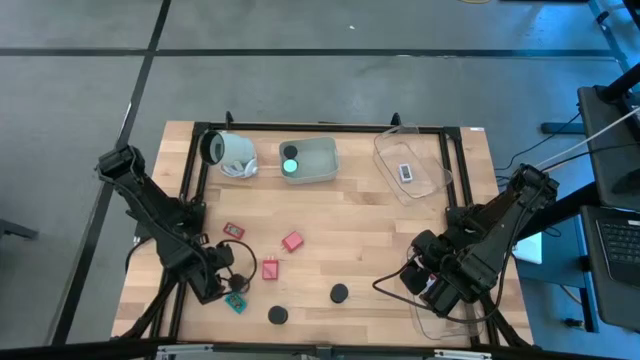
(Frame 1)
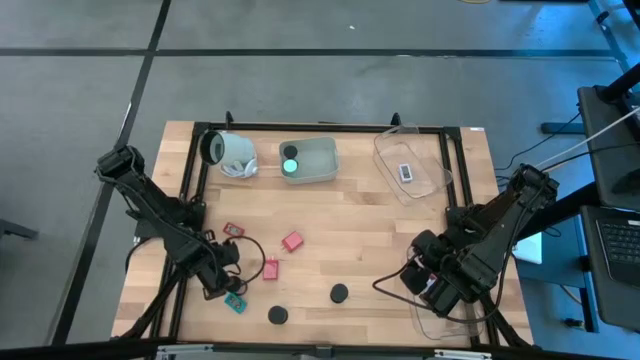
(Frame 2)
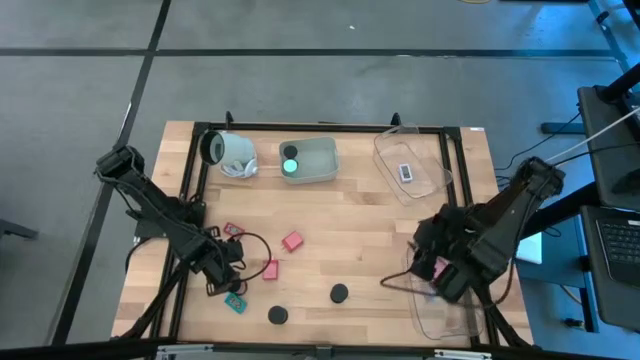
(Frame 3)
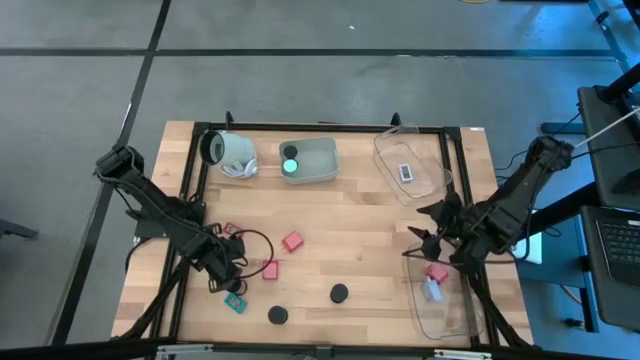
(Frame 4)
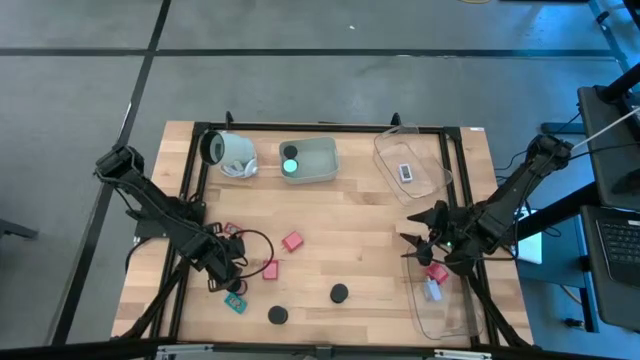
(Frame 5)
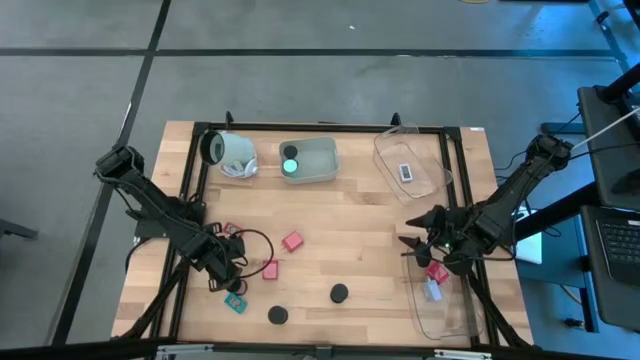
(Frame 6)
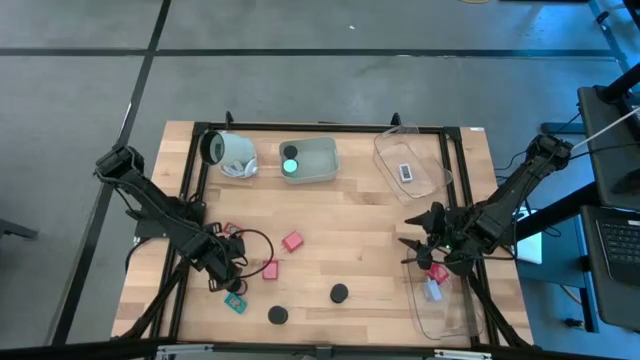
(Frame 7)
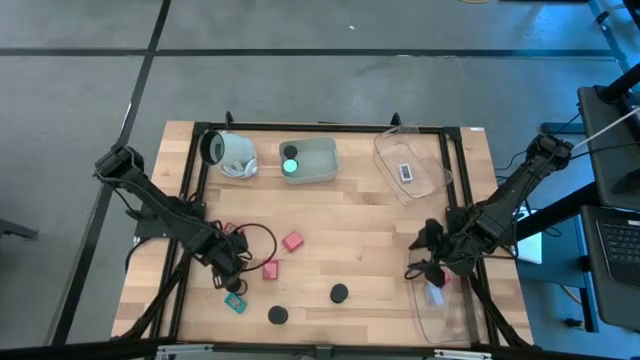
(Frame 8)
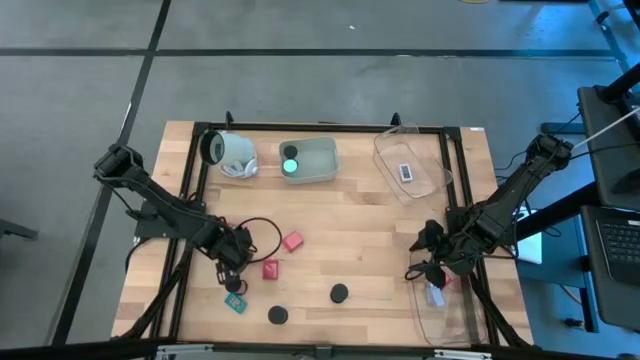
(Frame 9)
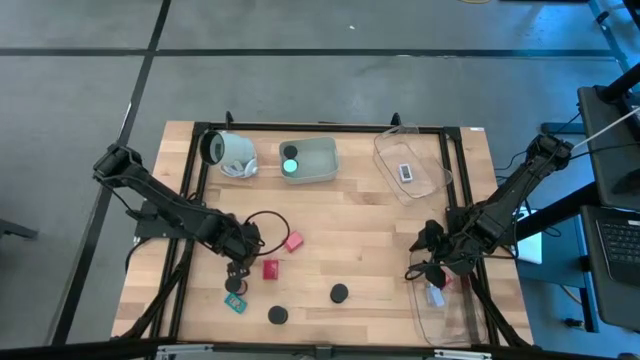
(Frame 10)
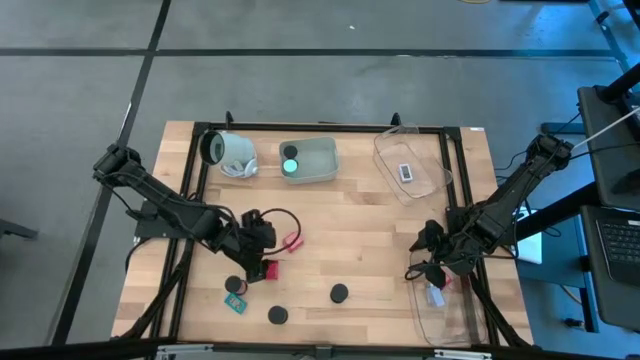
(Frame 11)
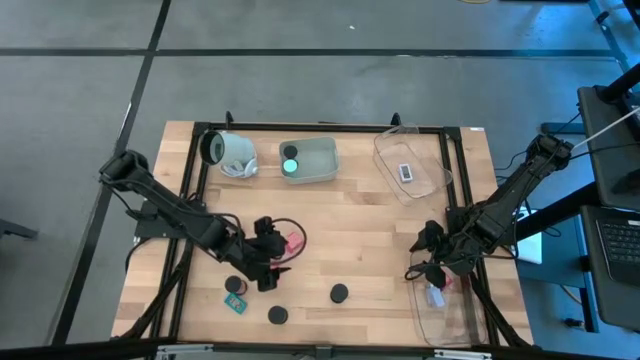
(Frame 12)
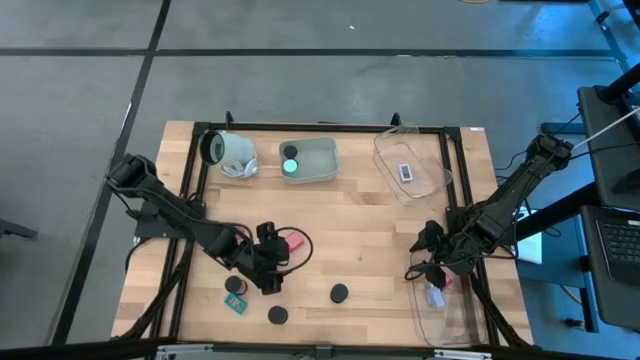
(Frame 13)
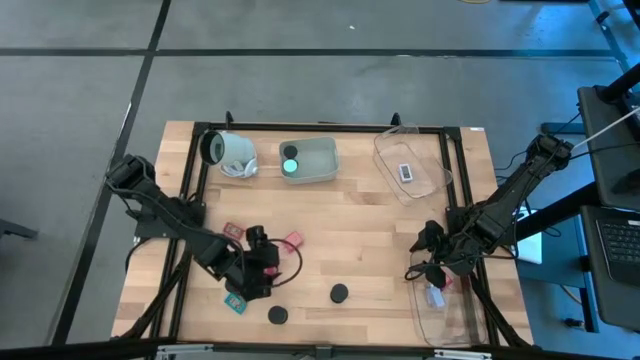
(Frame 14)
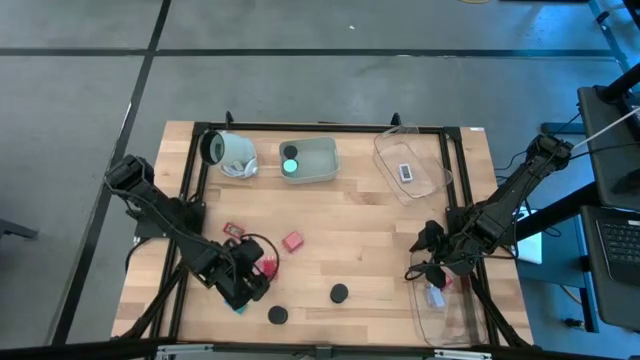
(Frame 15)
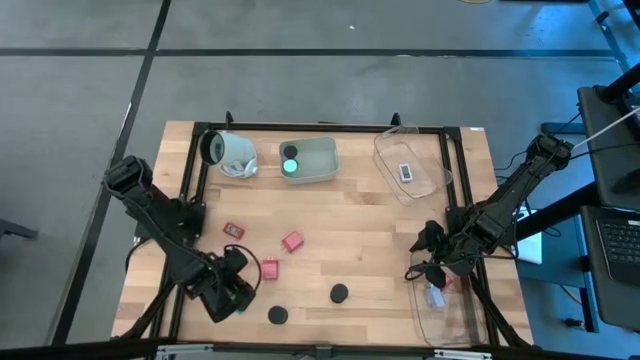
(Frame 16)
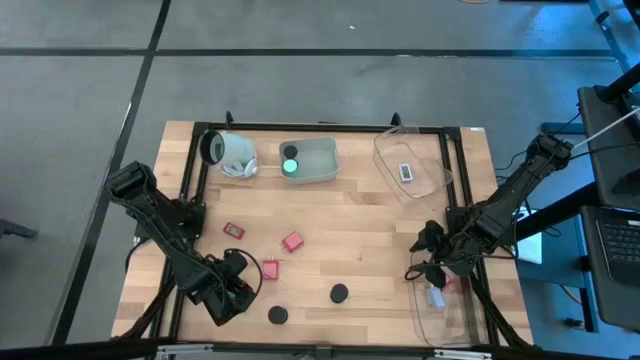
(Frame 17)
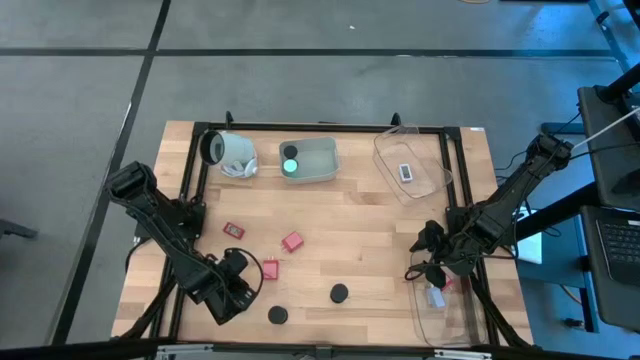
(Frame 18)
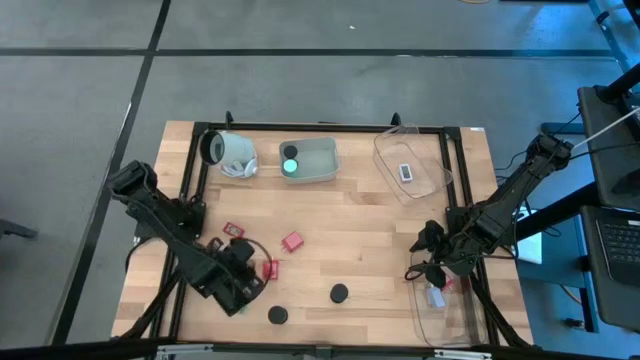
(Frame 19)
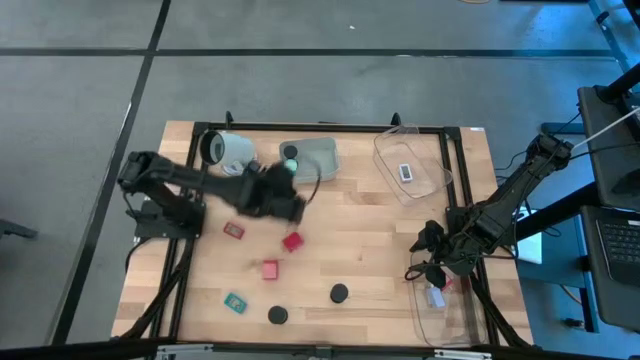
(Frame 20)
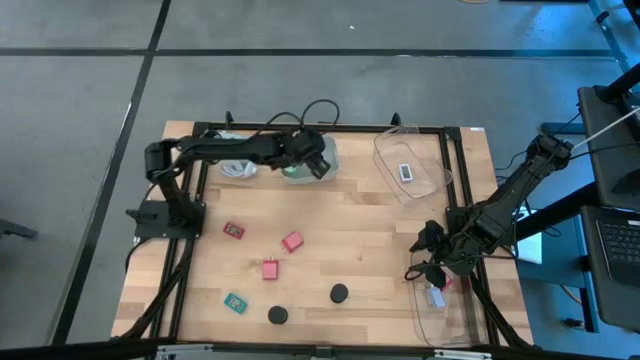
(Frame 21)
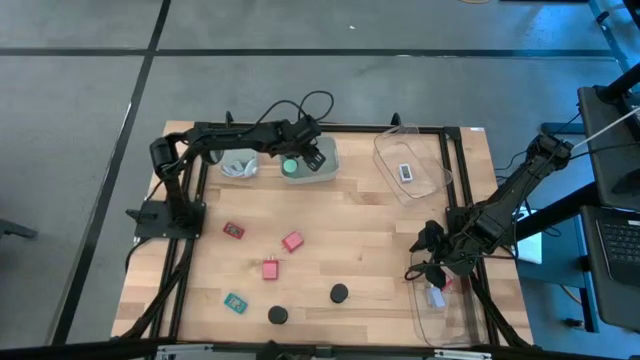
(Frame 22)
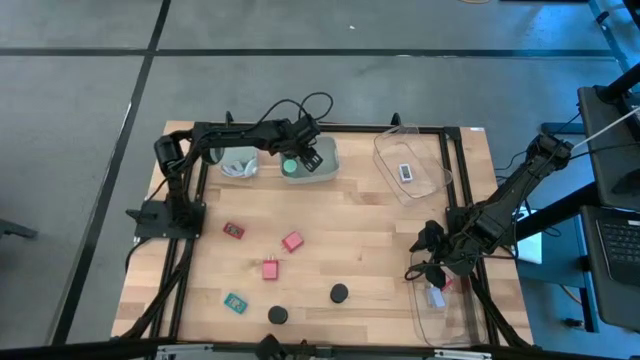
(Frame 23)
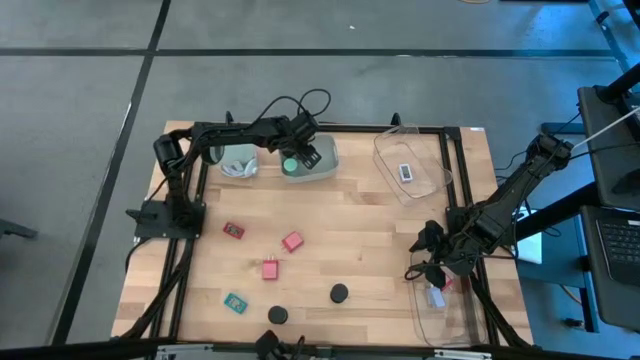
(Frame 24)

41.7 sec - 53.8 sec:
Task: Pick & Place Office items
Put the red hourglass into the gray bin

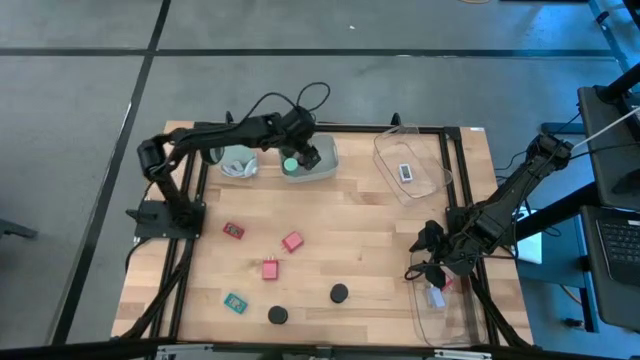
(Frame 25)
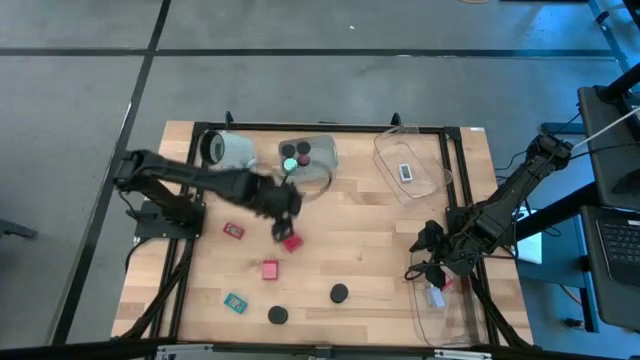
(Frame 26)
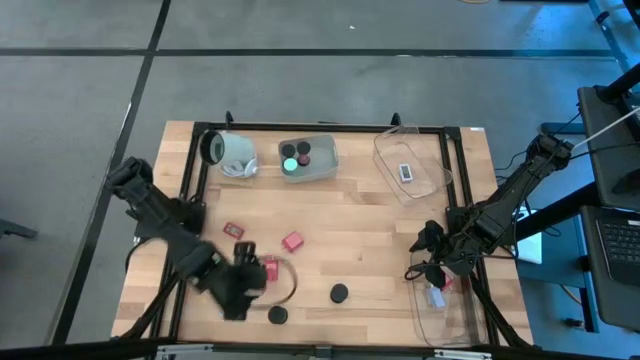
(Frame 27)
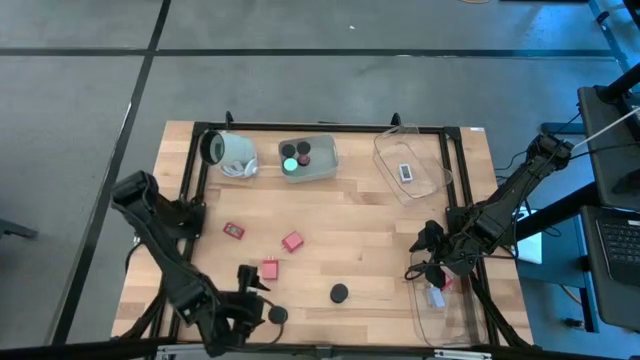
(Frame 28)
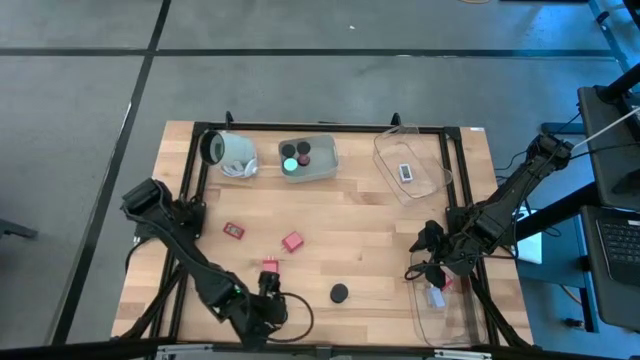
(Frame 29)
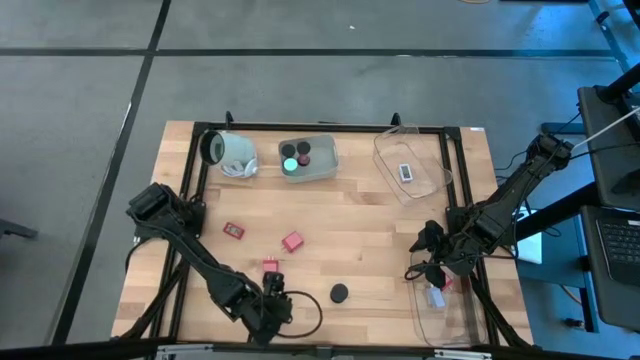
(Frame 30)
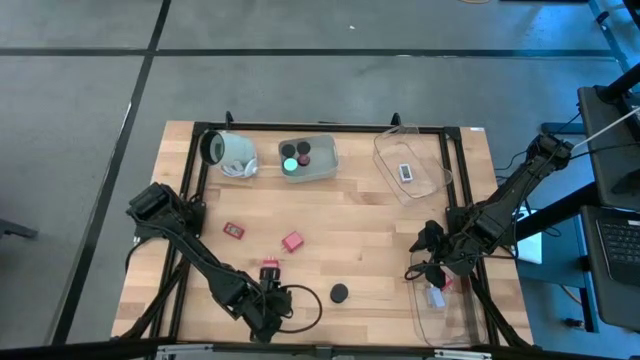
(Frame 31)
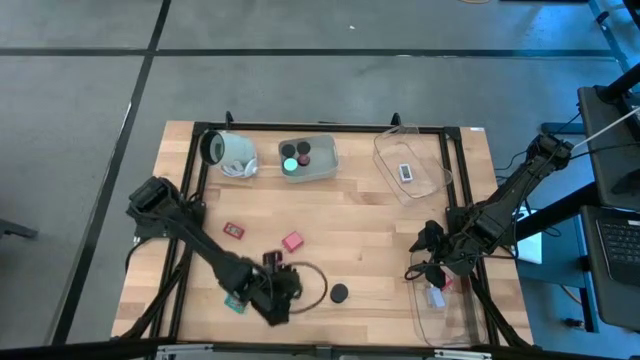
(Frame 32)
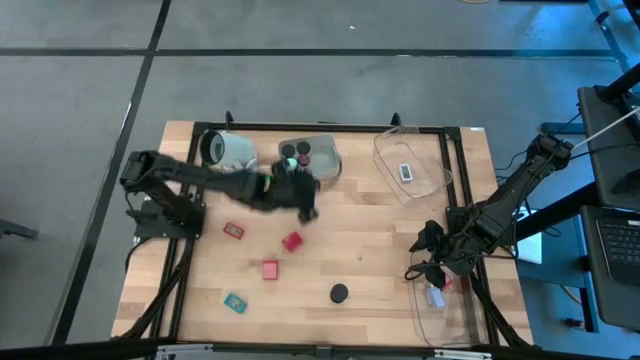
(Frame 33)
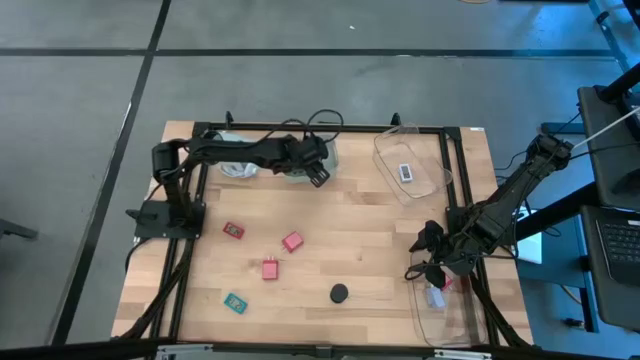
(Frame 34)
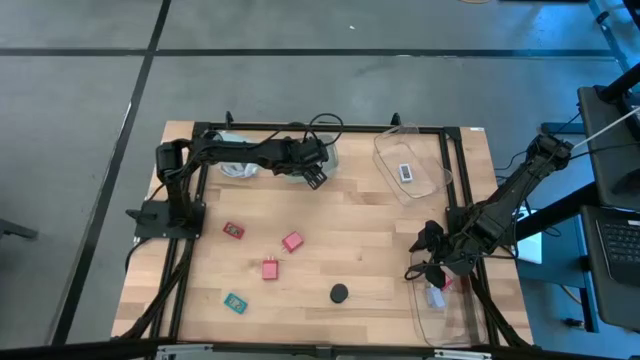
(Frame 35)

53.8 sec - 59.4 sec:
Put the white hourglass into the gray bin

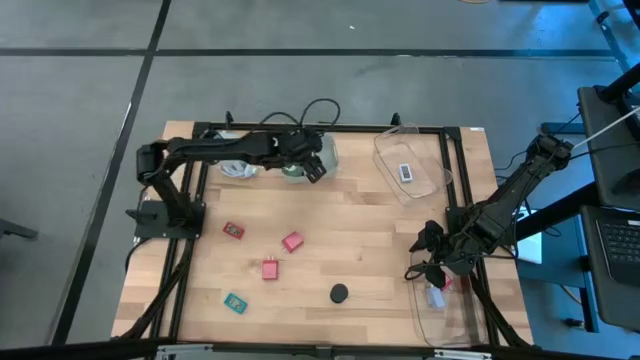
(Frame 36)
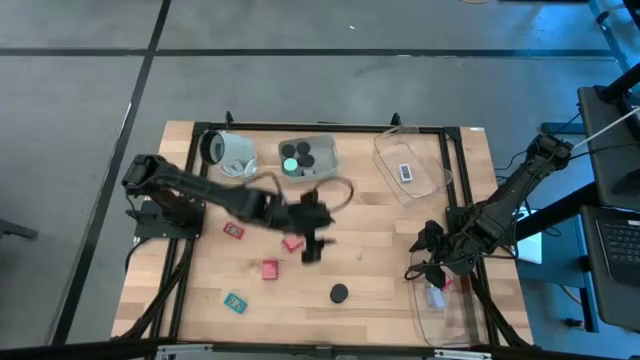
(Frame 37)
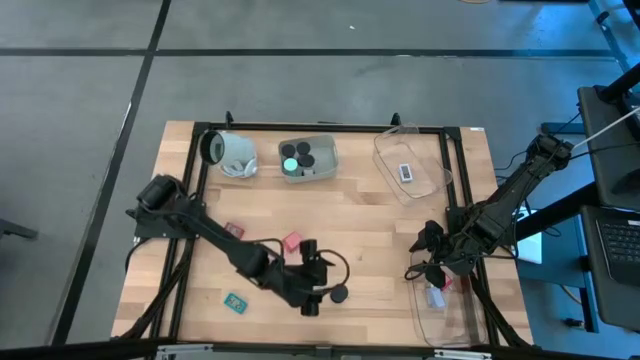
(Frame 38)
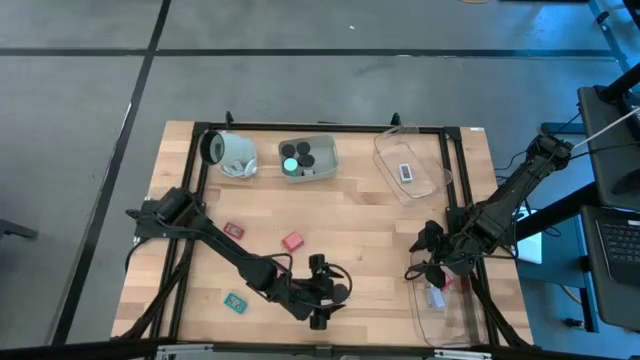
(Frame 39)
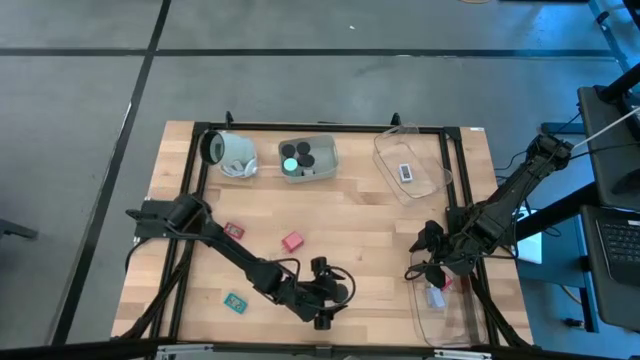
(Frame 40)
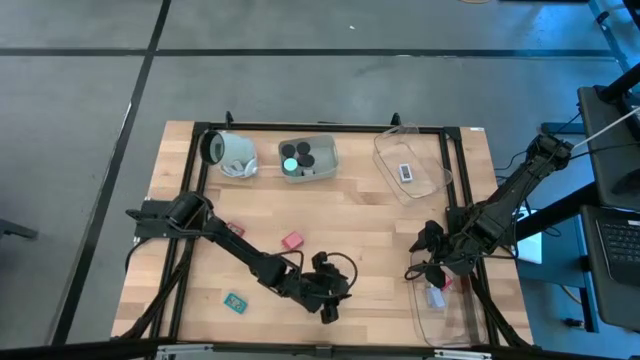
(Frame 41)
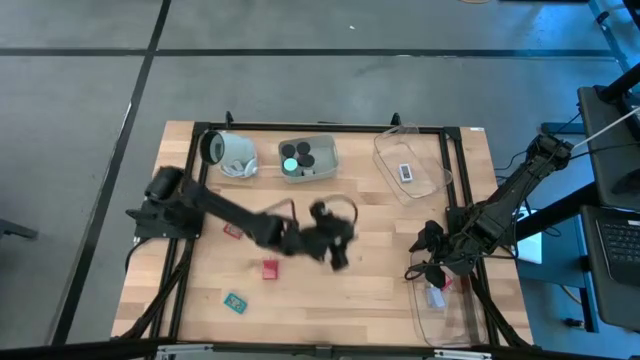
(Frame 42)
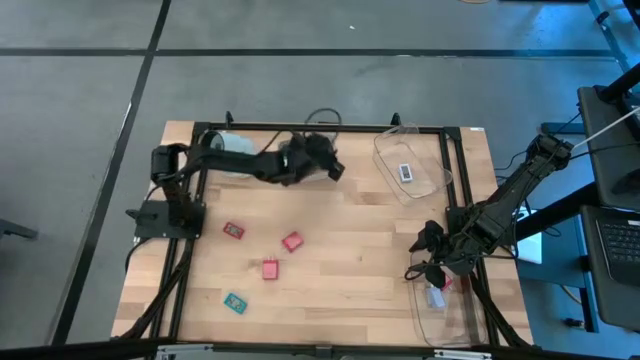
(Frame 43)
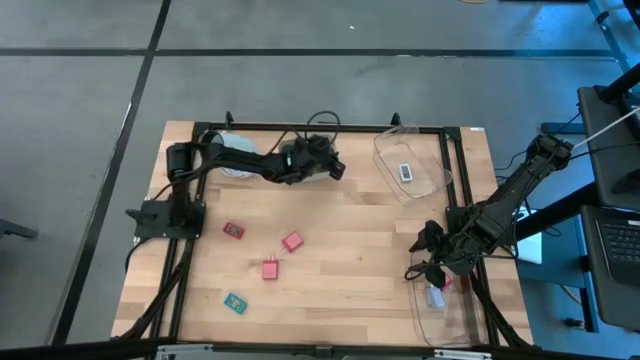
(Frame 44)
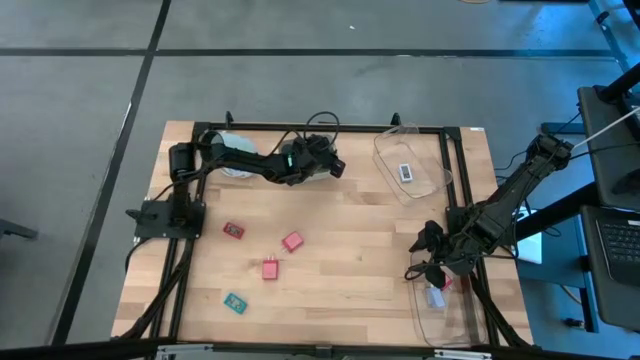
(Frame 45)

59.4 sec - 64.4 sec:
Put the blue hourglass into the gray bin
